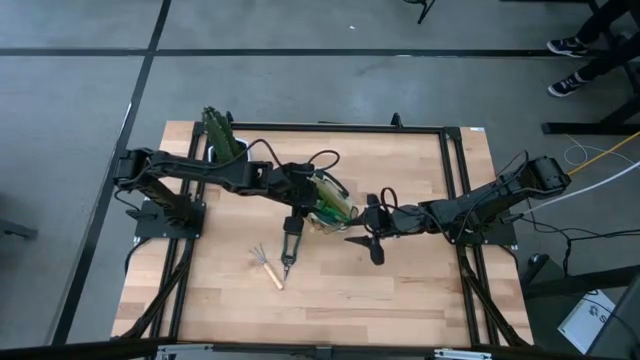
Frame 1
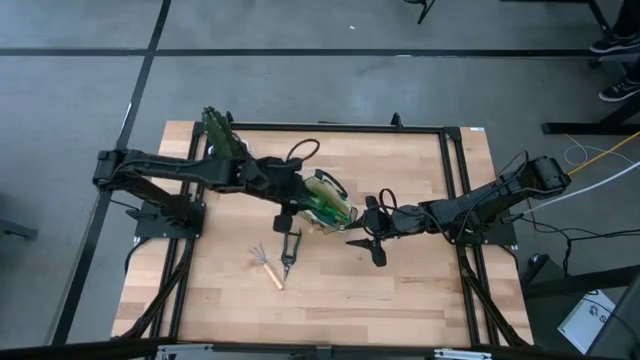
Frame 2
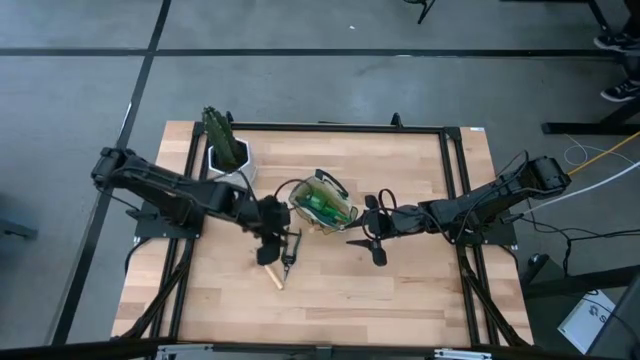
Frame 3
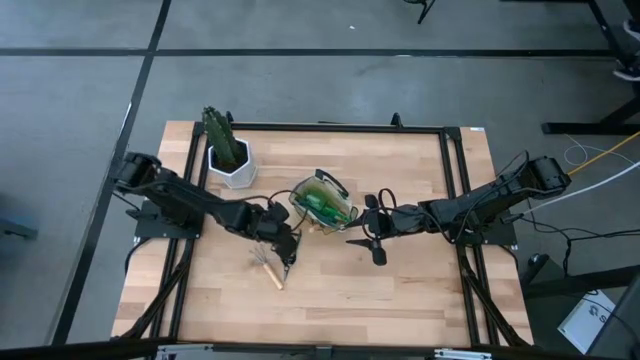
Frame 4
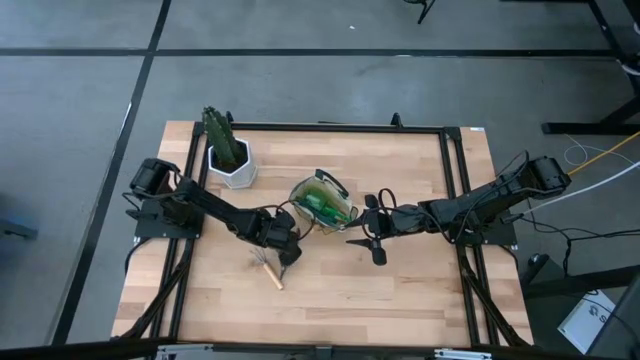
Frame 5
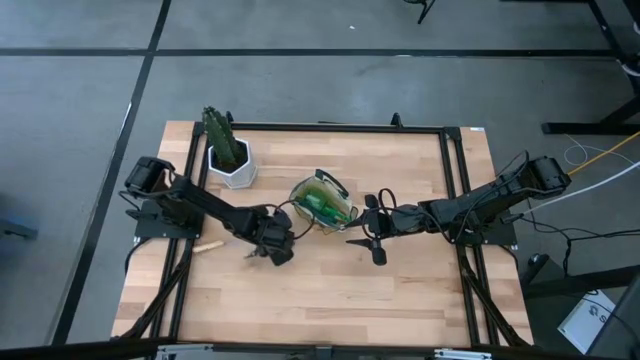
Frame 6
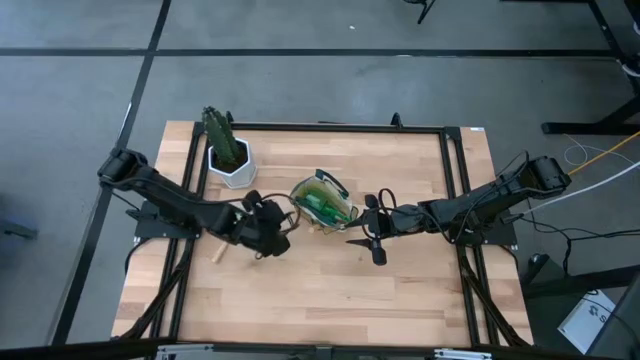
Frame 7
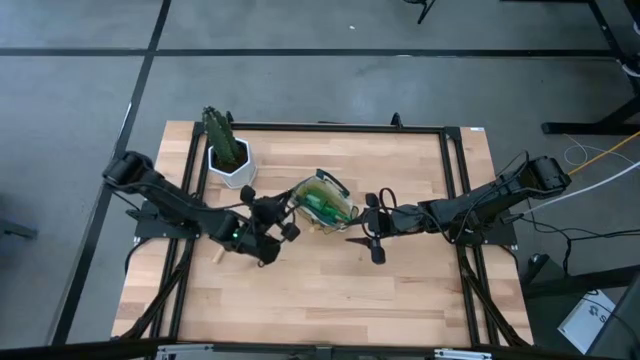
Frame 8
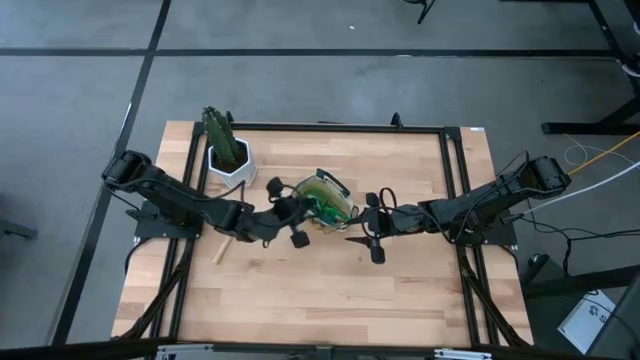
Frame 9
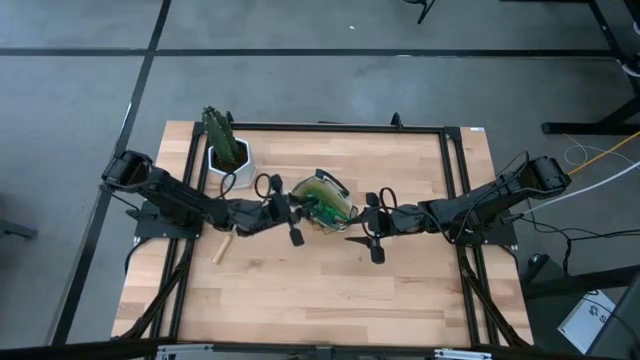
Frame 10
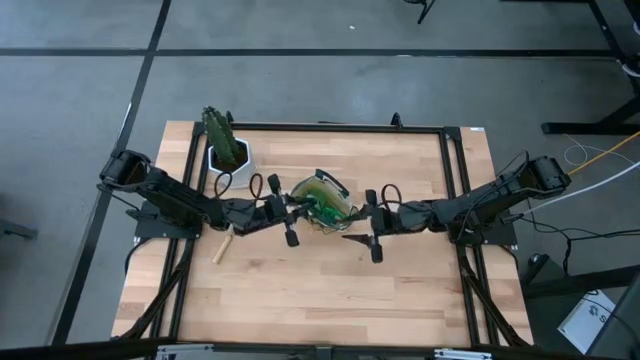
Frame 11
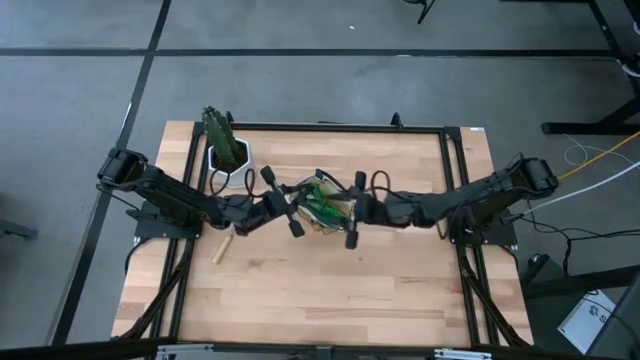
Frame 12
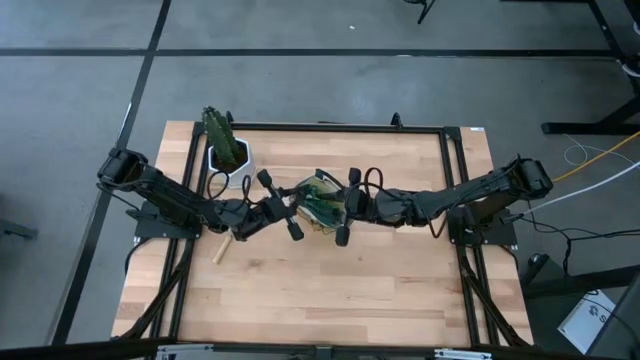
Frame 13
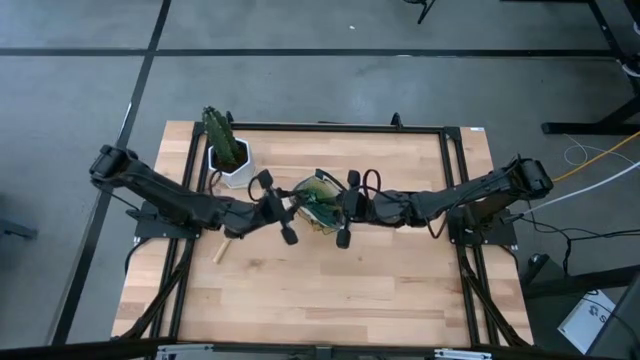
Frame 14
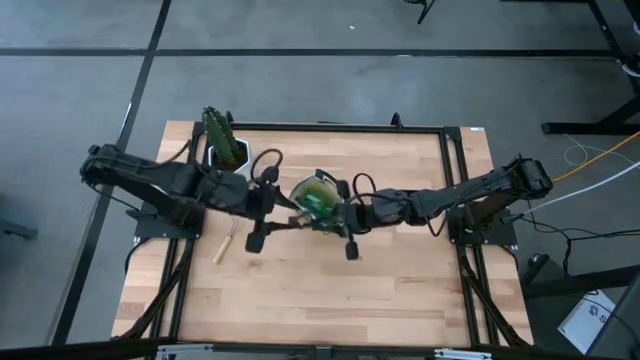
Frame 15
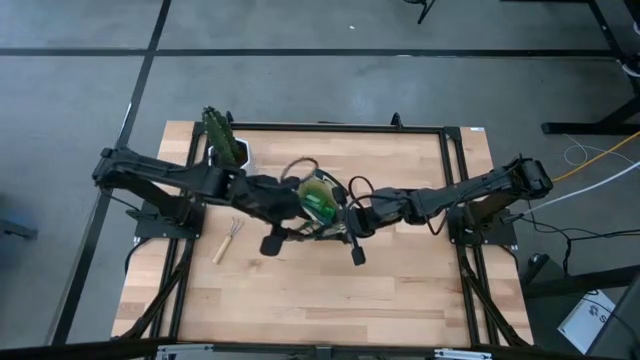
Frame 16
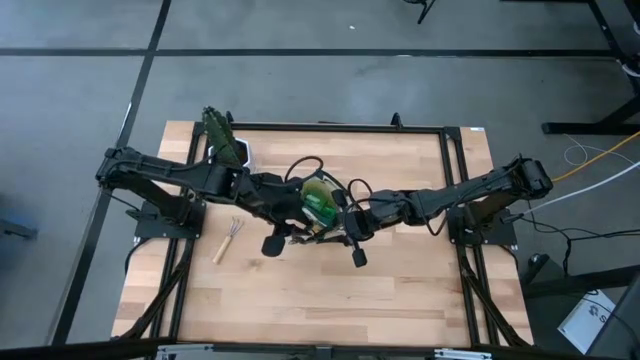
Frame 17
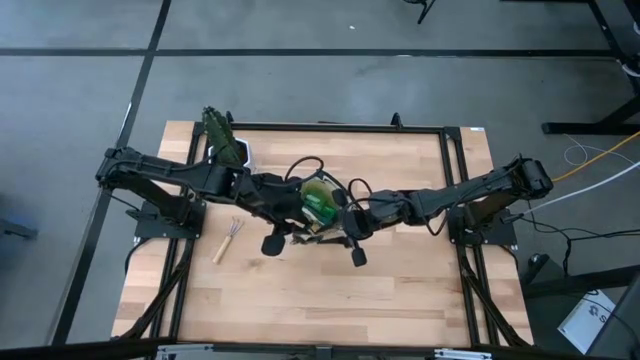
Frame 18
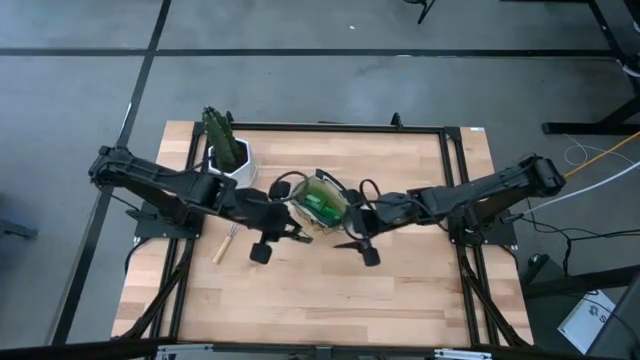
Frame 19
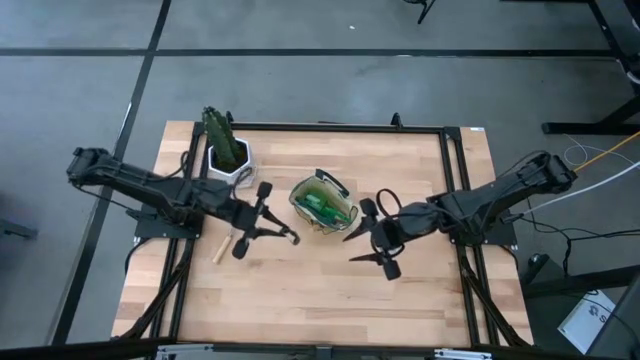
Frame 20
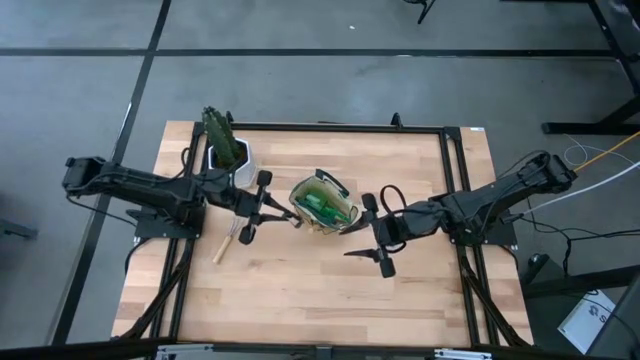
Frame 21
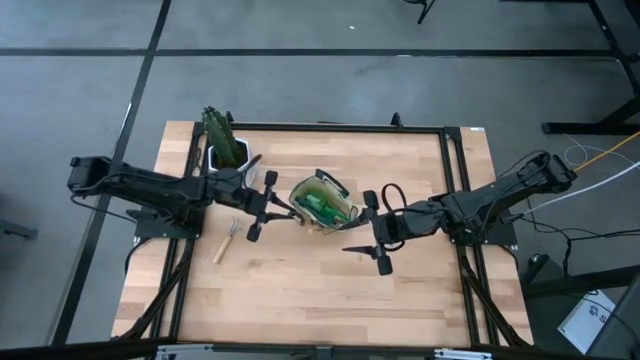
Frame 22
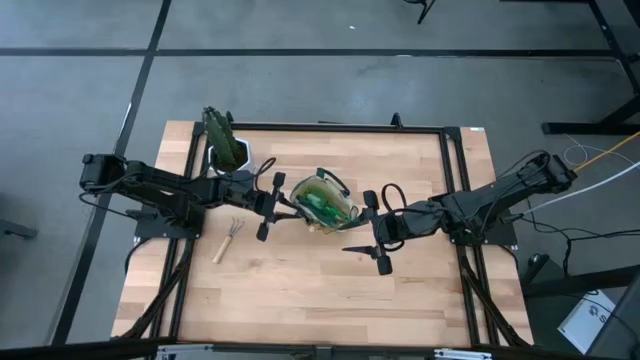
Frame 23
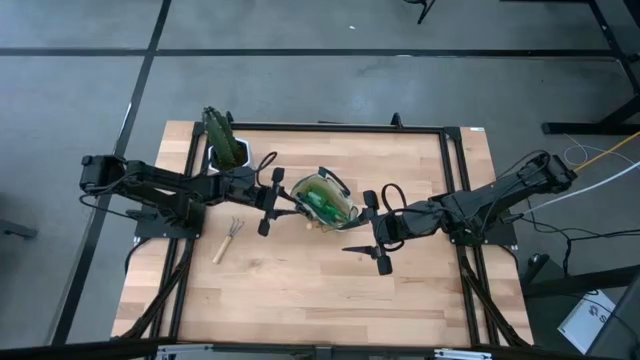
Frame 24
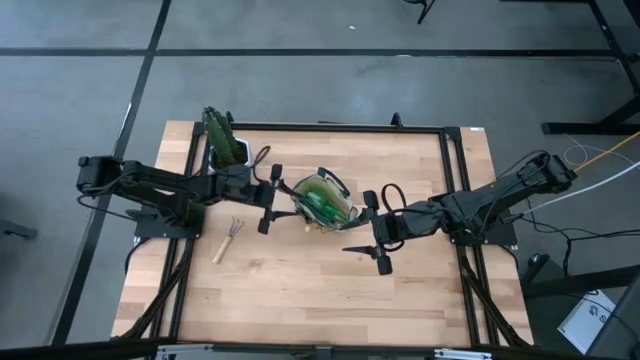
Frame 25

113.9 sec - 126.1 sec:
Task: Pick & Place Garden tools in Gardening bag
Put the fruit pruner into the gardening bag

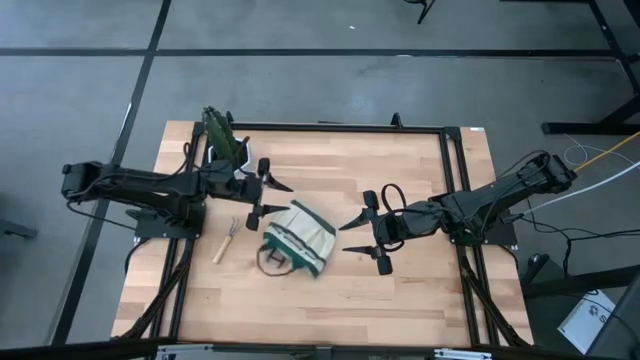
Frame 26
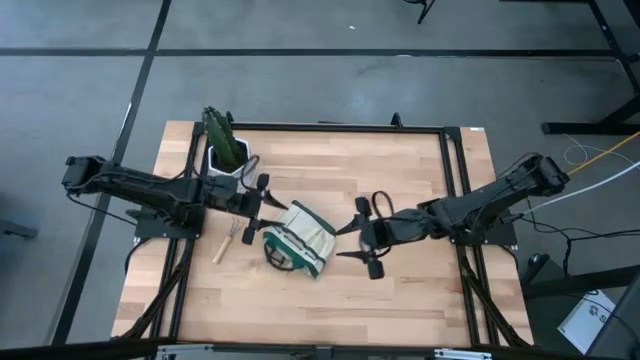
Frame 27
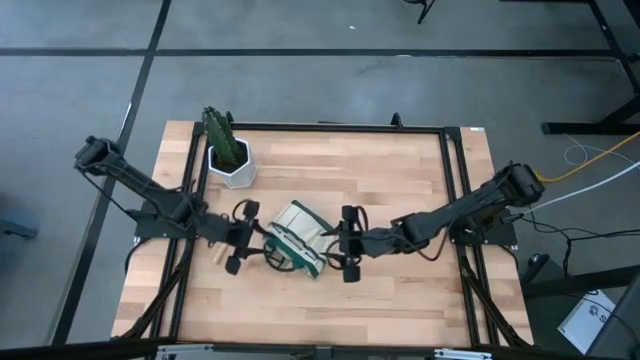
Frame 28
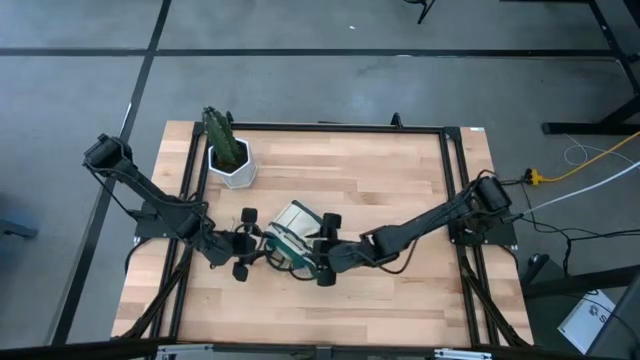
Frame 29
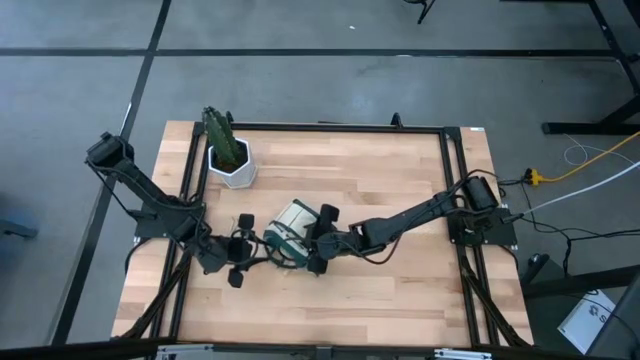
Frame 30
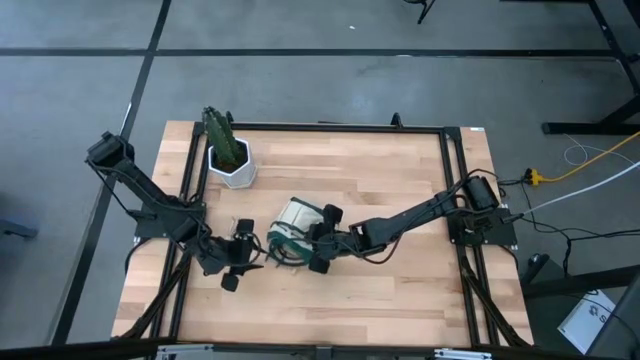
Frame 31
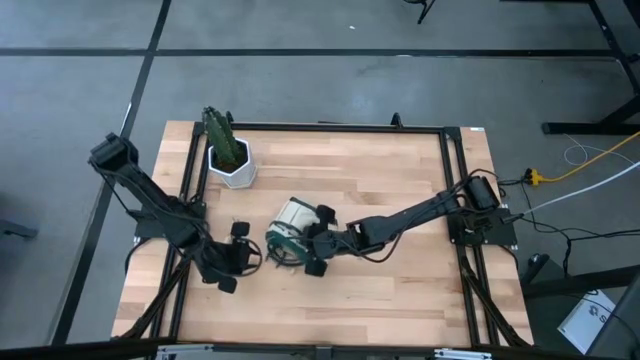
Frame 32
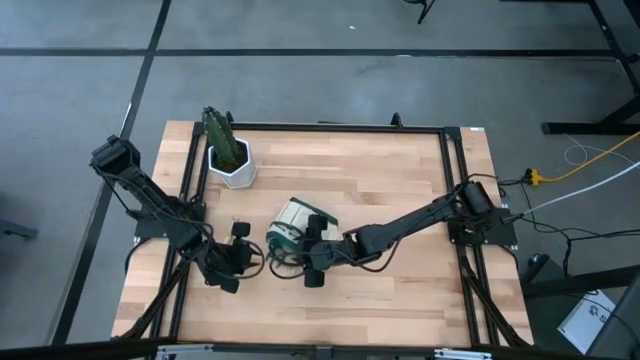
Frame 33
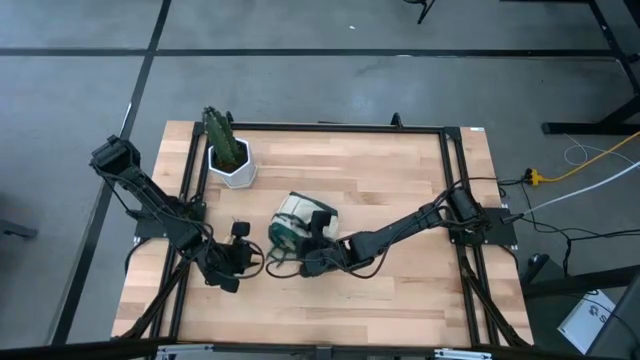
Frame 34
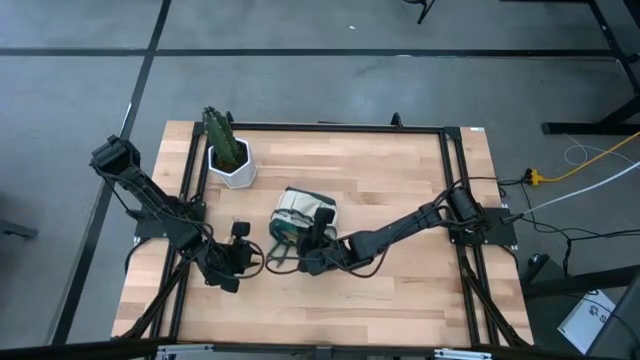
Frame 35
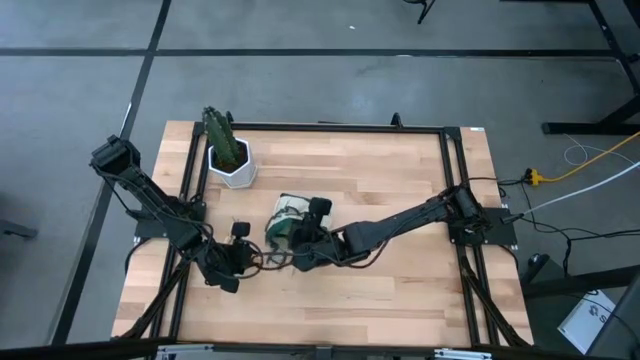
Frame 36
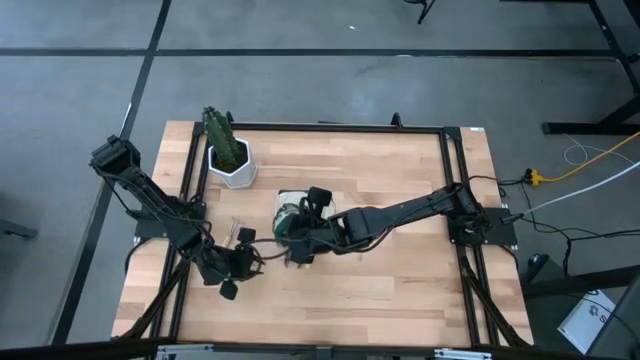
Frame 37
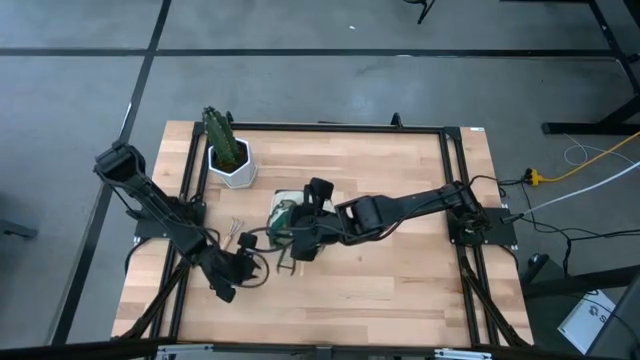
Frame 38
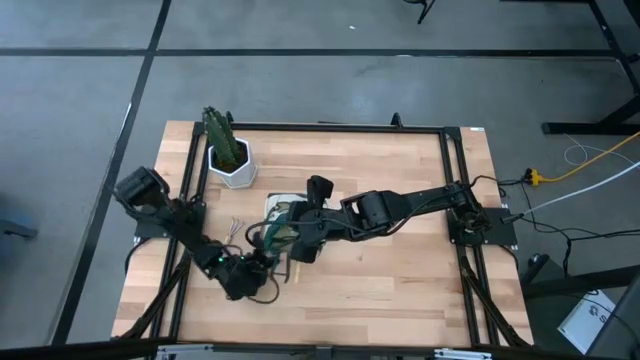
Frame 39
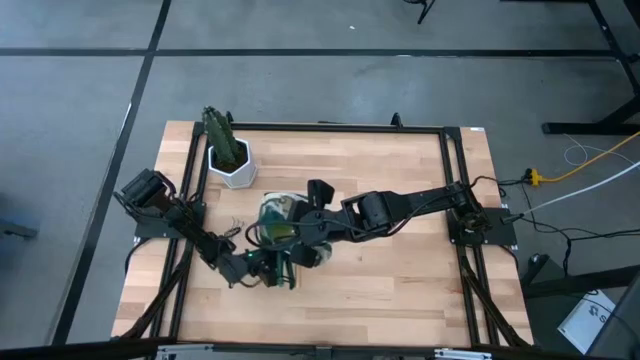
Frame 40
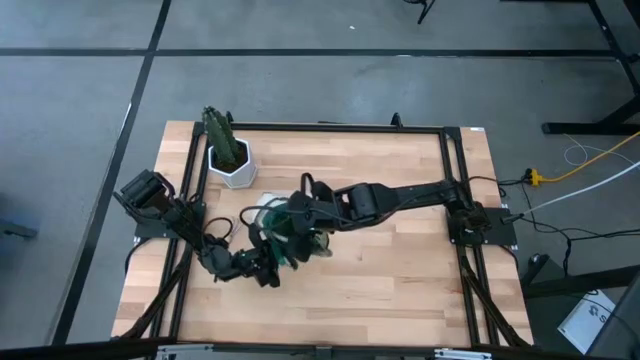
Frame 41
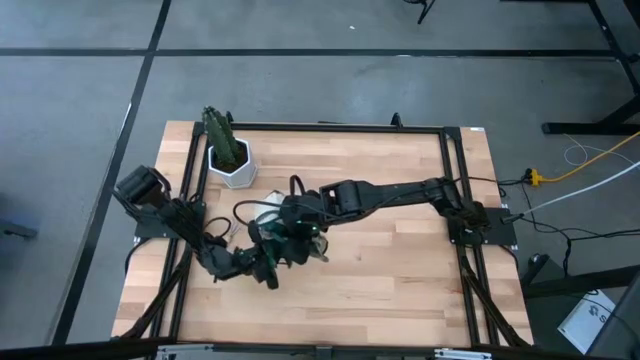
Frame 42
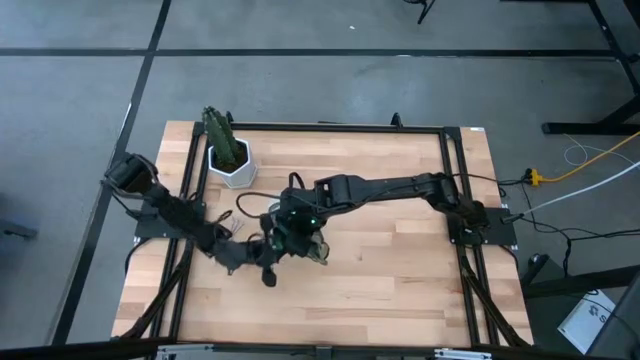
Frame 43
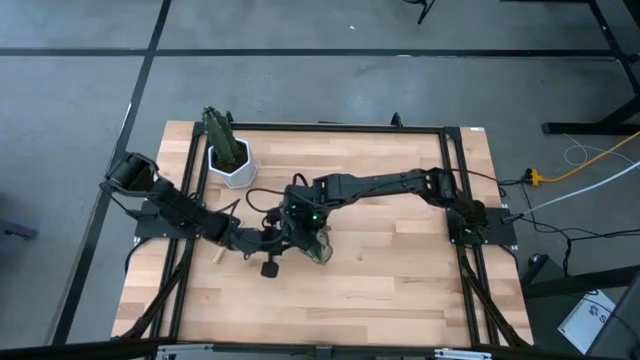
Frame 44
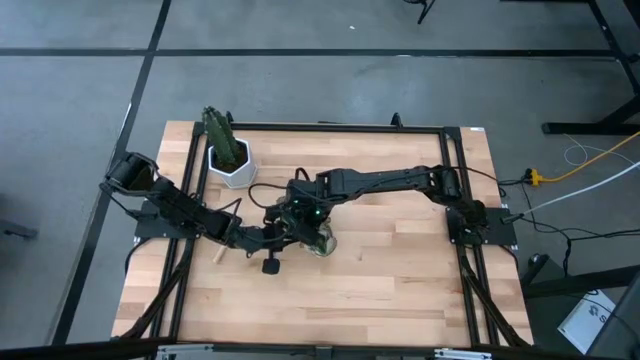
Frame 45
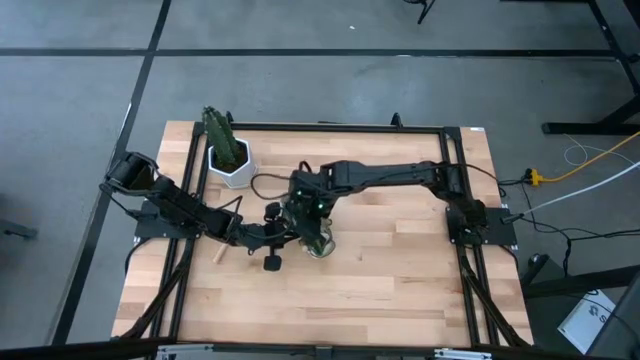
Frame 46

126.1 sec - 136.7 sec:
Adjust the gardening bag on the table
